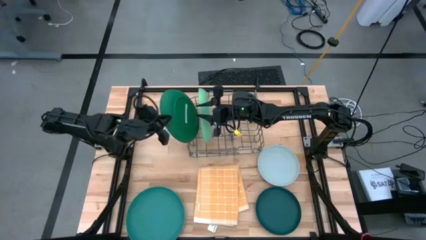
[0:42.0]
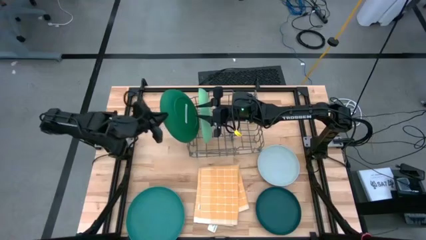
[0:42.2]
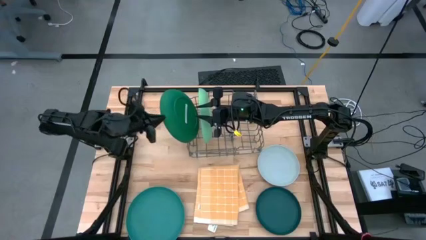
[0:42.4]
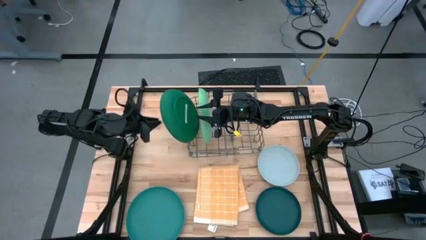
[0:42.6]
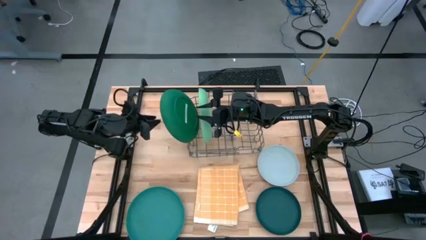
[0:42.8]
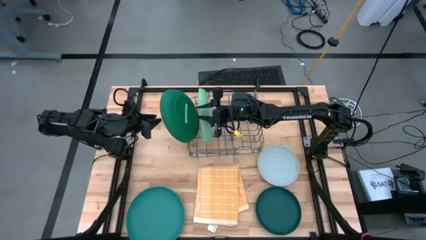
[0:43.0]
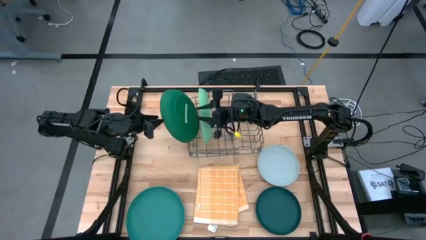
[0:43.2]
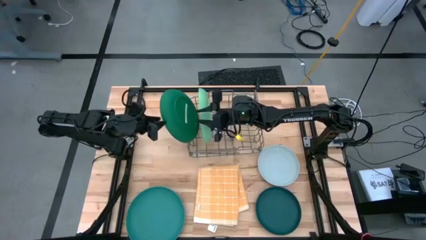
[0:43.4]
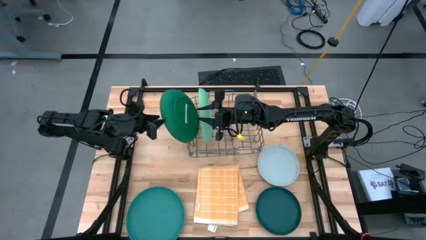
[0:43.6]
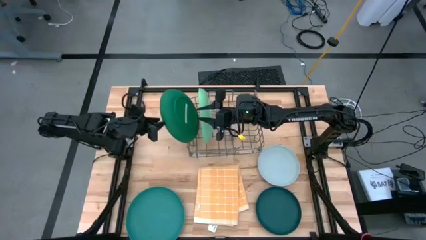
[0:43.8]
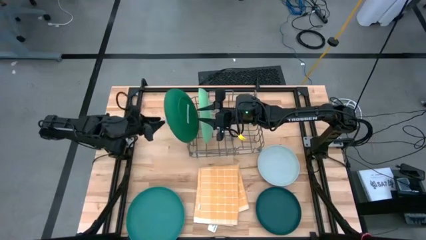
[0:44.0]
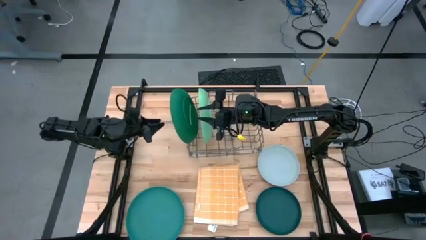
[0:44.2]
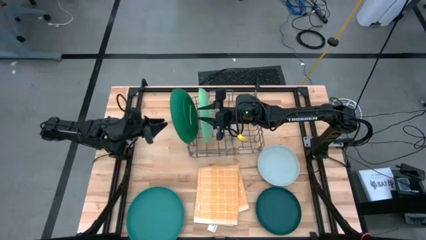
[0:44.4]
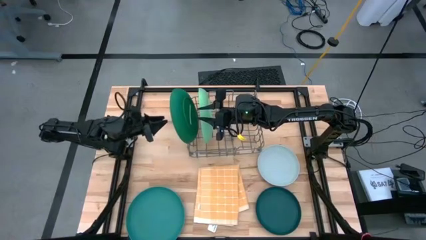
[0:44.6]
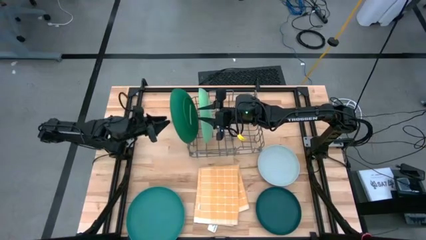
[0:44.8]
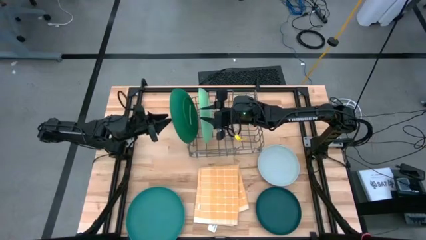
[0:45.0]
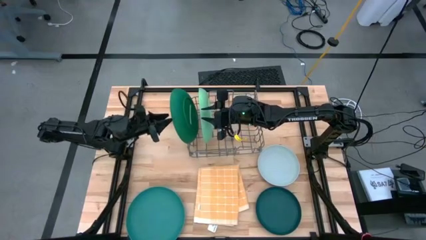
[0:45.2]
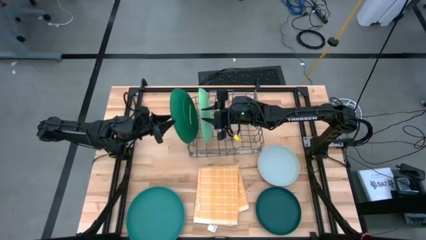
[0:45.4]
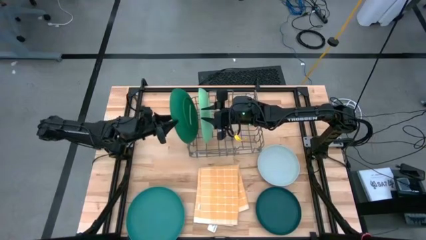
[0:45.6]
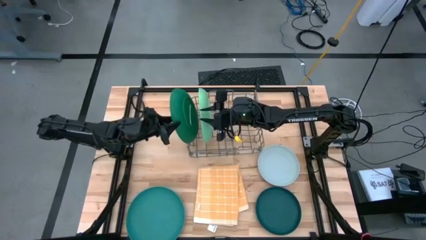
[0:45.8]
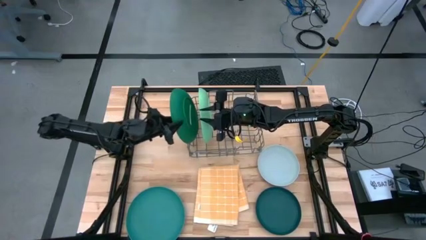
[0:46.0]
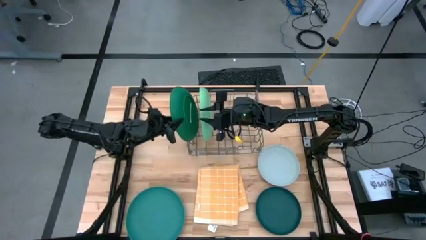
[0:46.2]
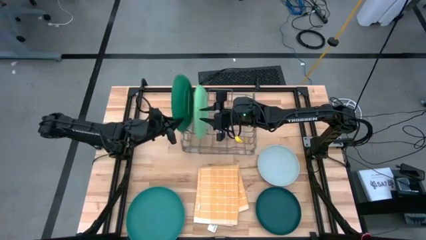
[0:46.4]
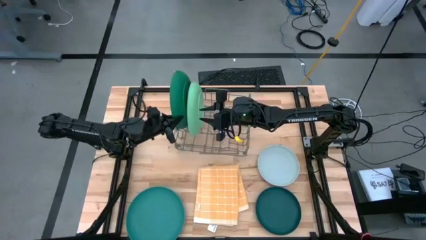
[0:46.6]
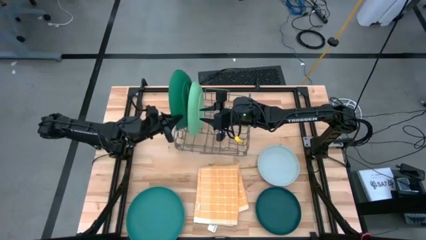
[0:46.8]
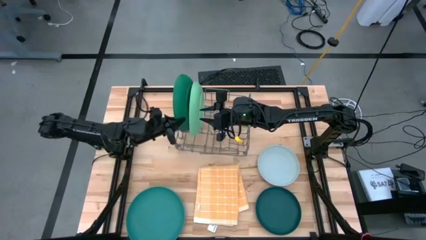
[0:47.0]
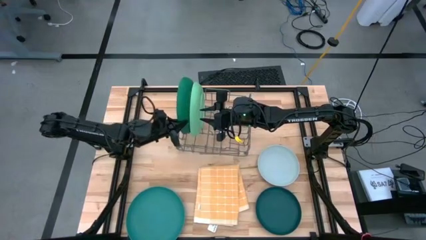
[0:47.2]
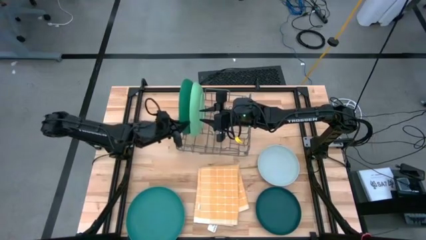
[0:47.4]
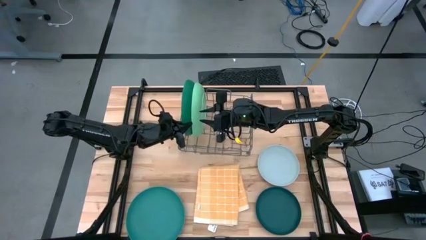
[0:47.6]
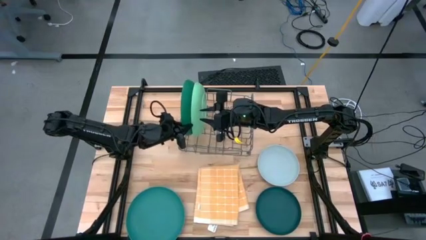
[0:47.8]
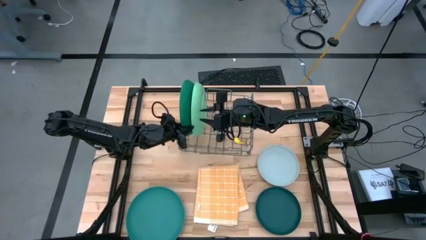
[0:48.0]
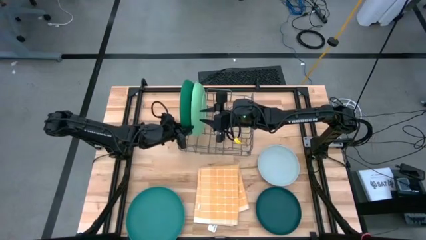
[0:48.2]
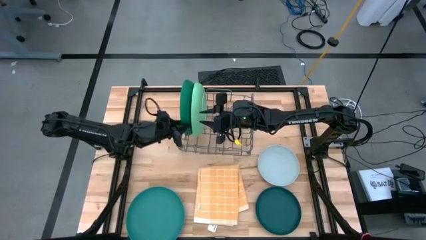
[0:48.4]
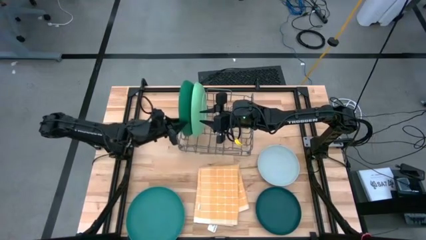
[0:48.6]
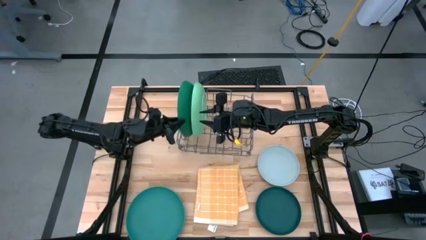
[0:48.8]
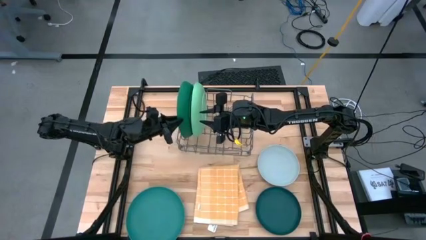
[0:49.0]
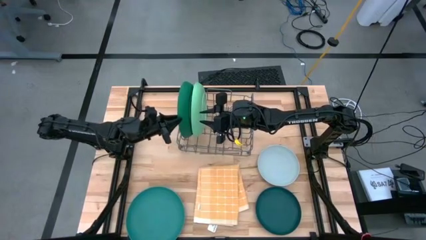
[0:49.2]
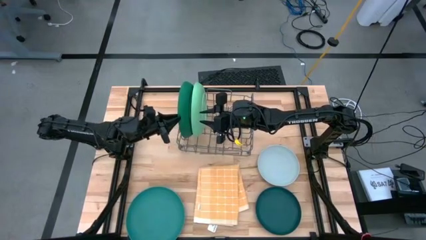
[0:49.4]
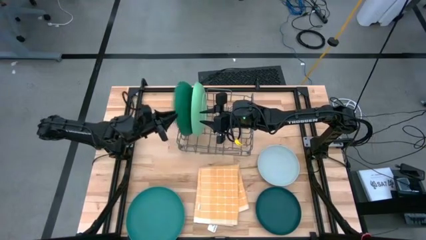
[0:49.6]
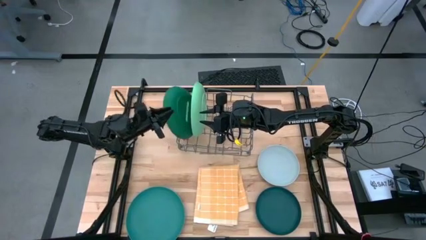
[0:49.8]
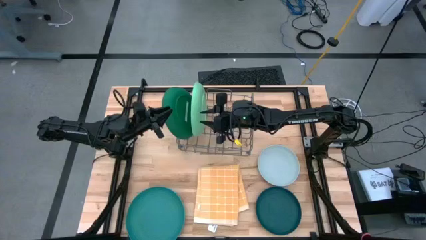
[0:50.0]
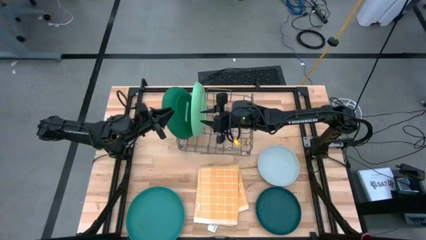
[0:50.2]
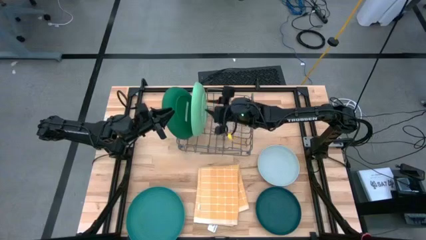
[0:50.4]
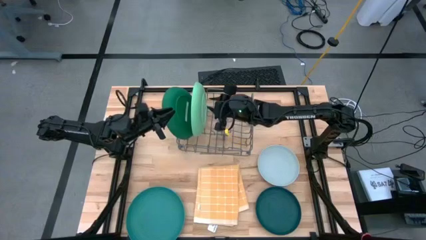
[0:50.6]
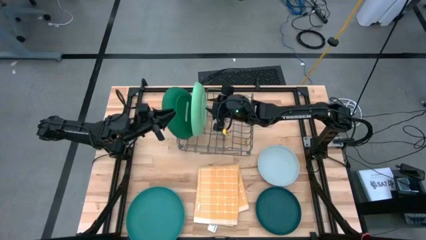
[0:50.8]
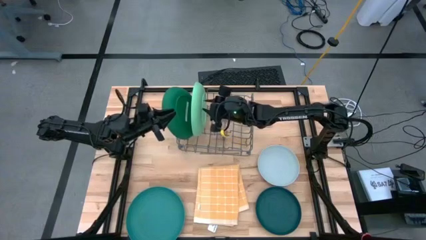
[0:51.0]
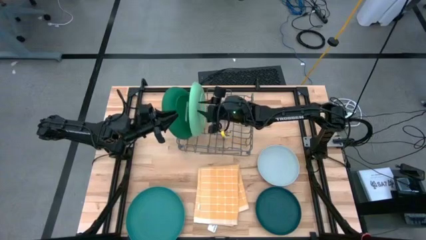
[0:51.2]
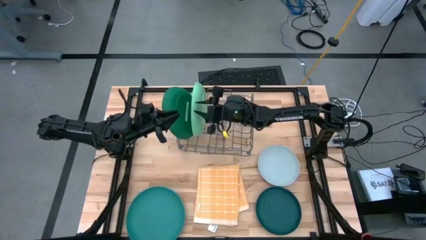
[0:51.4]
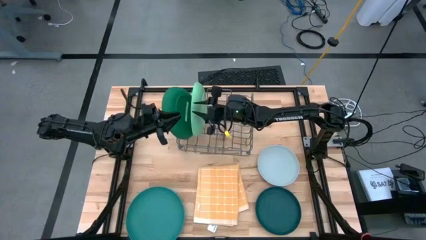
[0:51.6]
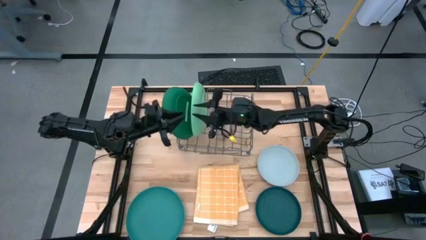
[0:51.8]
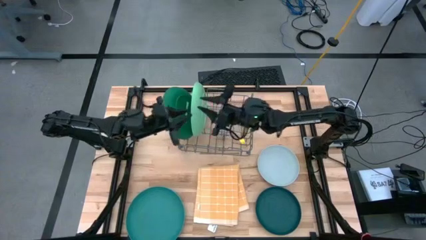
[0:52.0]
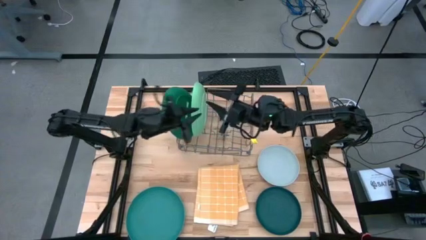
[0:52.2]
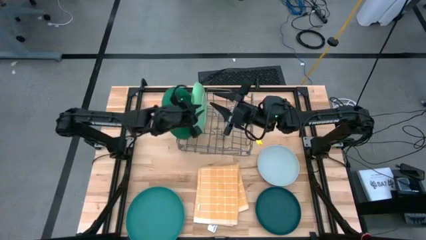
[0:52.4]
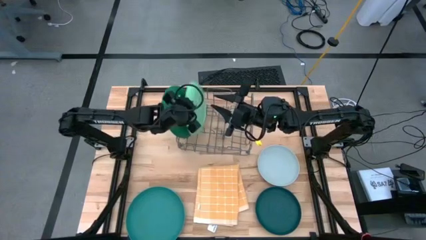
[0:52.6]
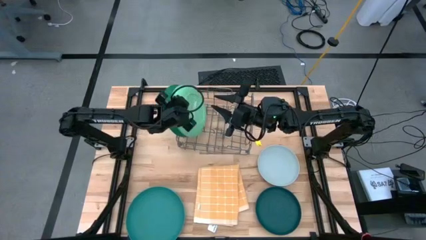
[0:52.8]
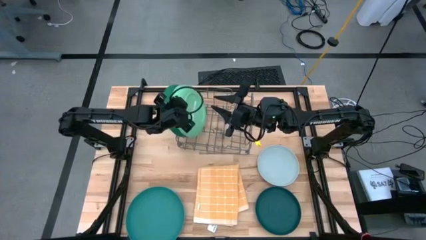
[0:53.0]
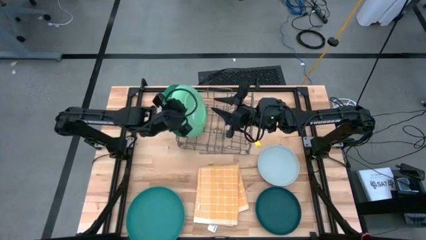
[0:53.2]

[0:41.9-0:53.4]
Task: Sort dishes
Adjust the position of the plates in the dish rack
